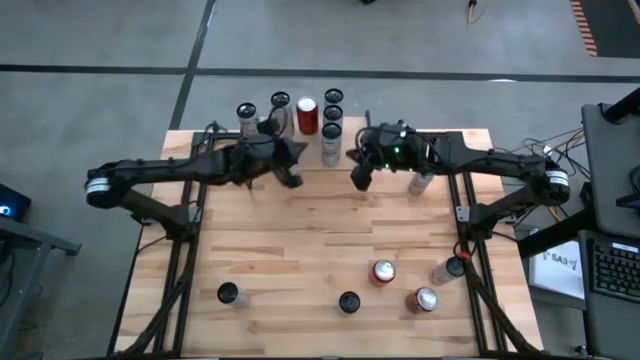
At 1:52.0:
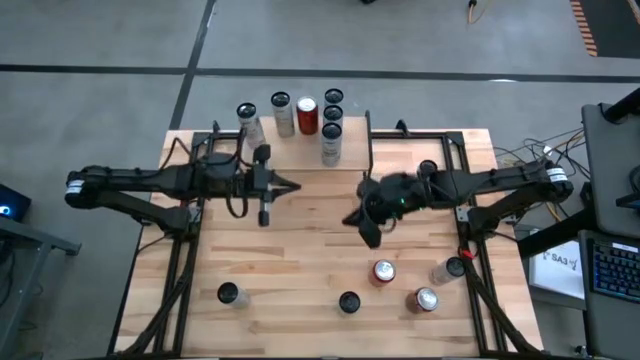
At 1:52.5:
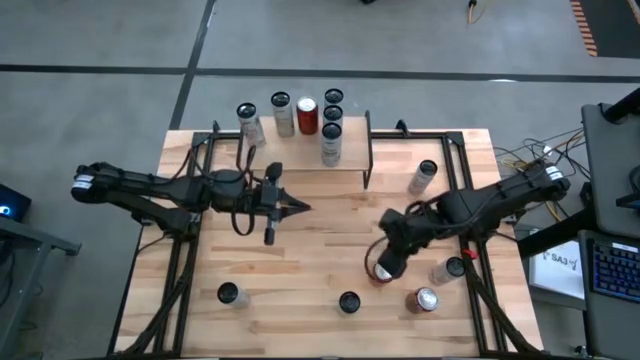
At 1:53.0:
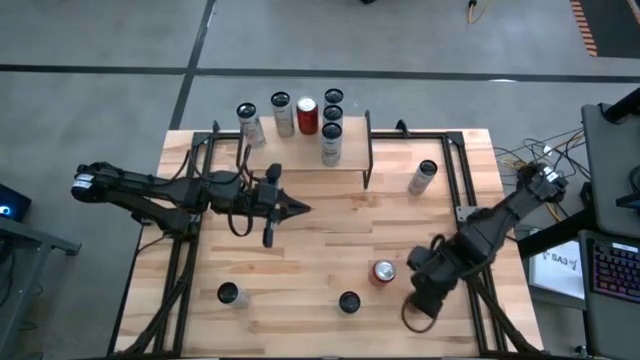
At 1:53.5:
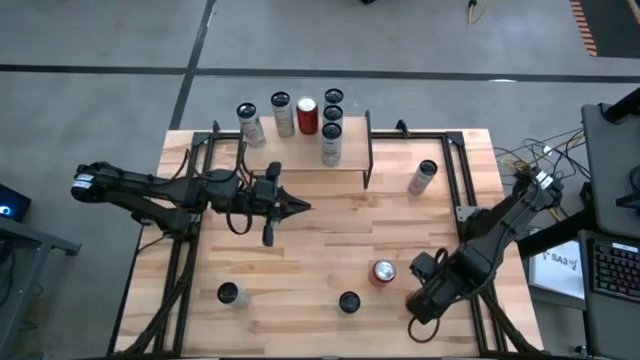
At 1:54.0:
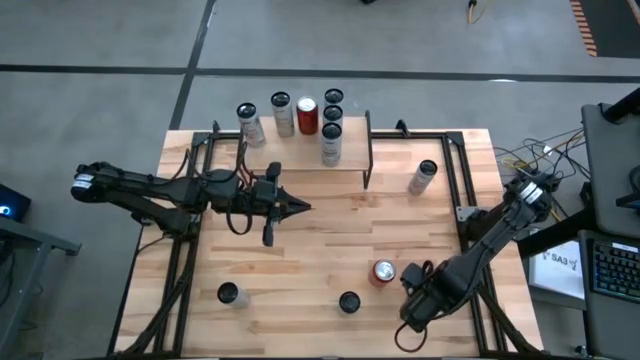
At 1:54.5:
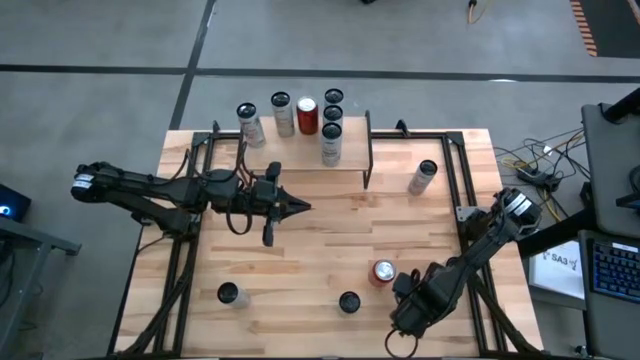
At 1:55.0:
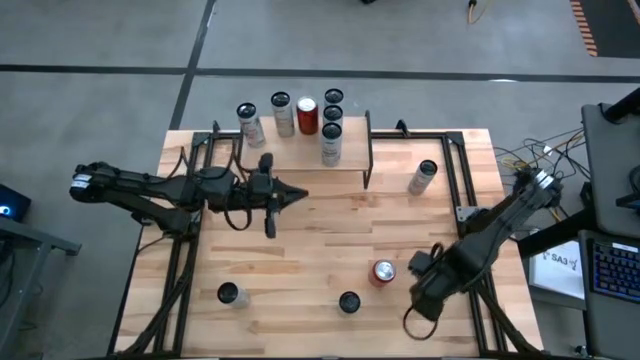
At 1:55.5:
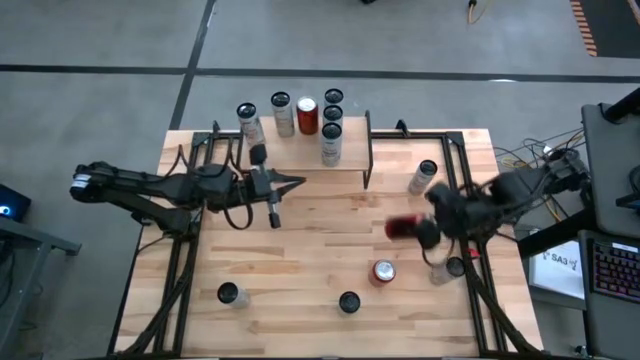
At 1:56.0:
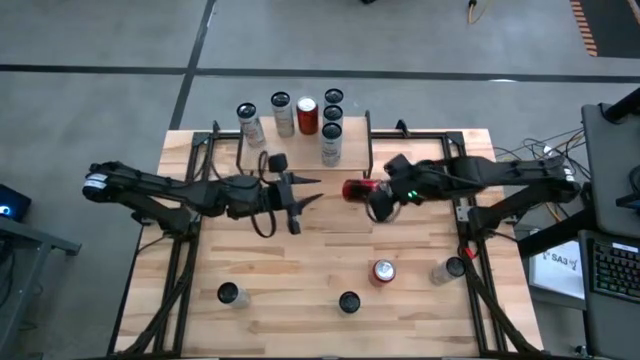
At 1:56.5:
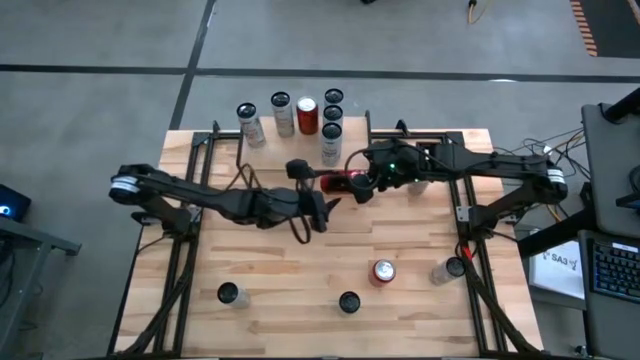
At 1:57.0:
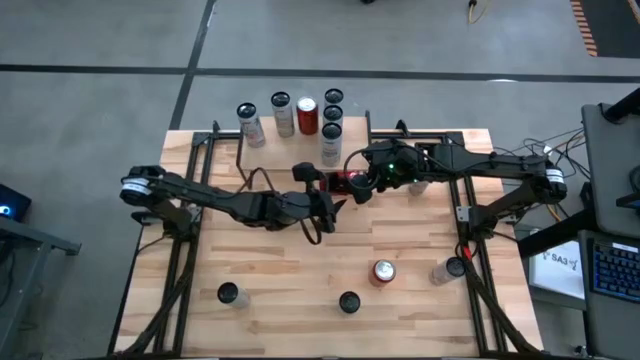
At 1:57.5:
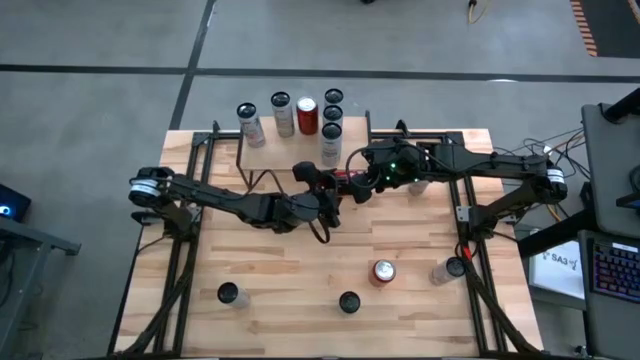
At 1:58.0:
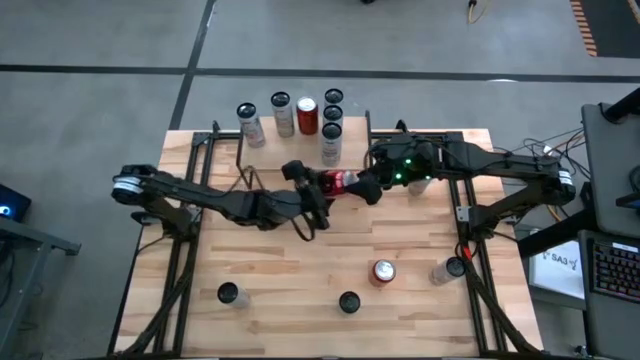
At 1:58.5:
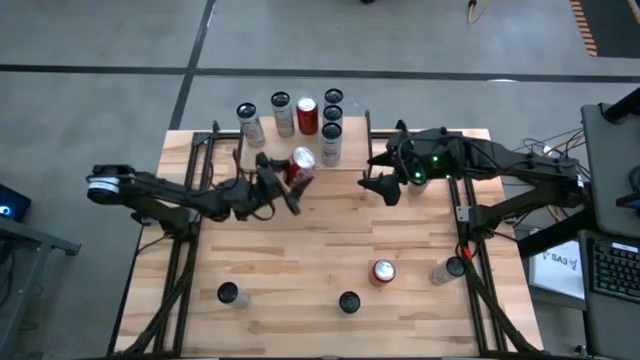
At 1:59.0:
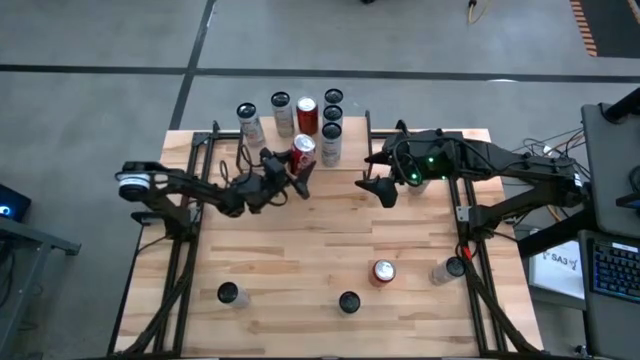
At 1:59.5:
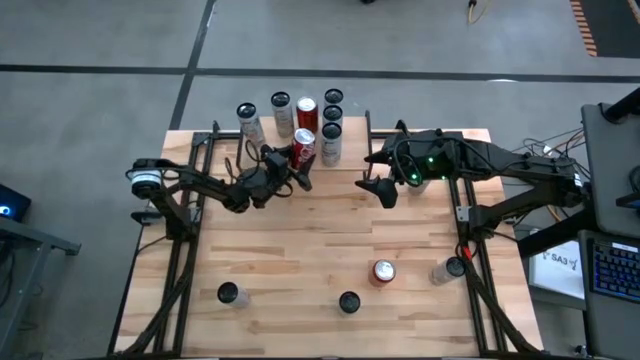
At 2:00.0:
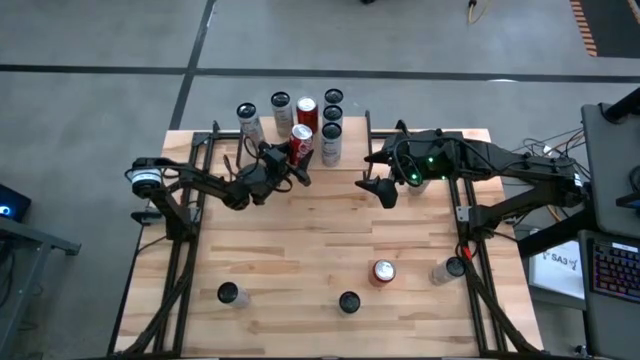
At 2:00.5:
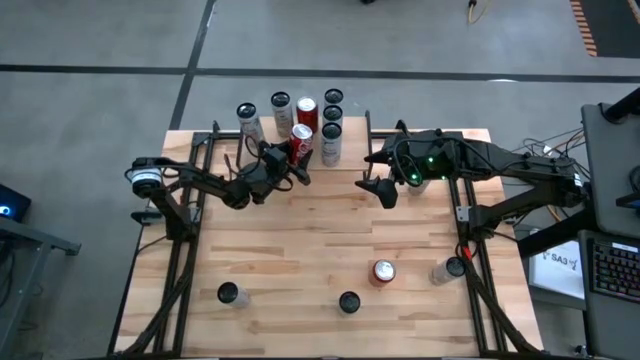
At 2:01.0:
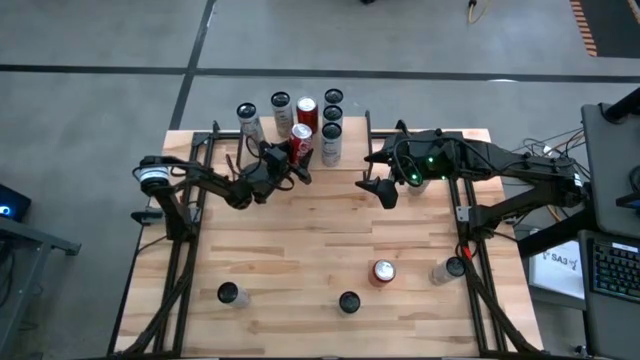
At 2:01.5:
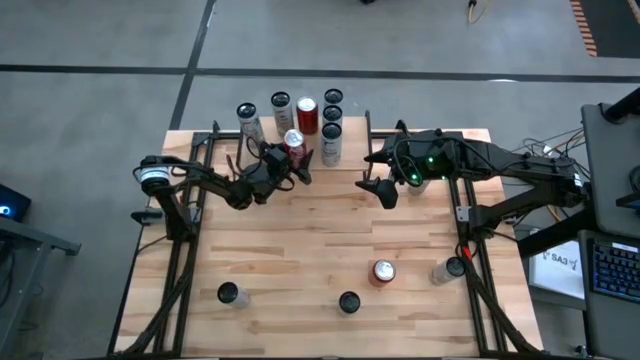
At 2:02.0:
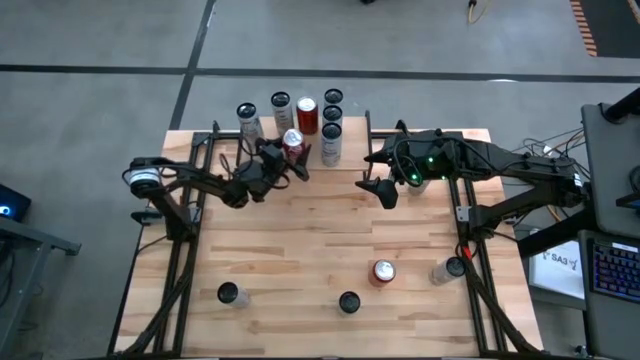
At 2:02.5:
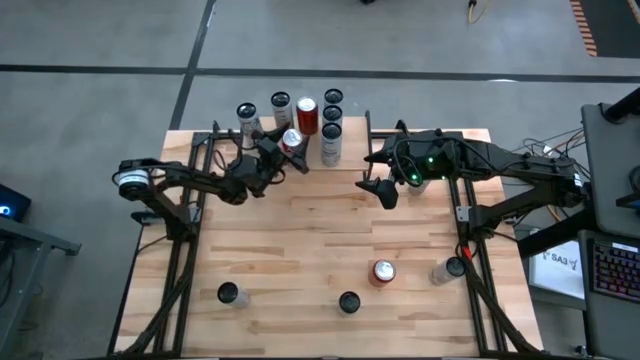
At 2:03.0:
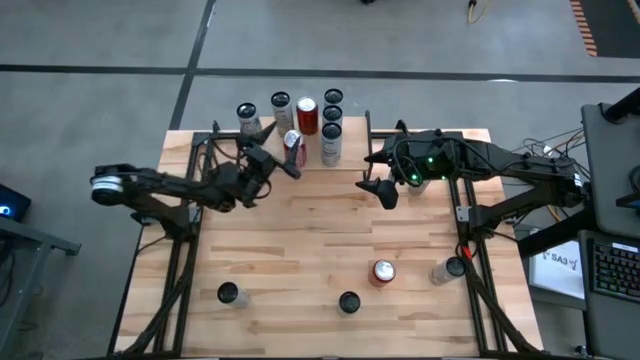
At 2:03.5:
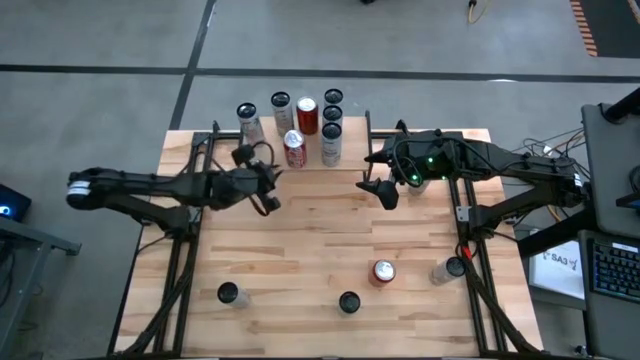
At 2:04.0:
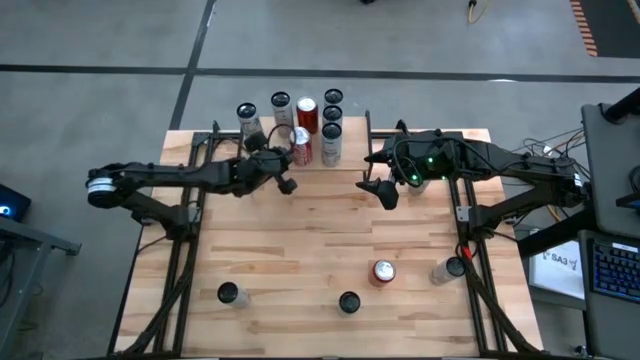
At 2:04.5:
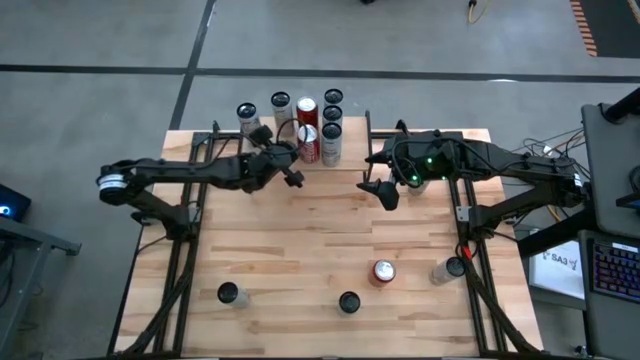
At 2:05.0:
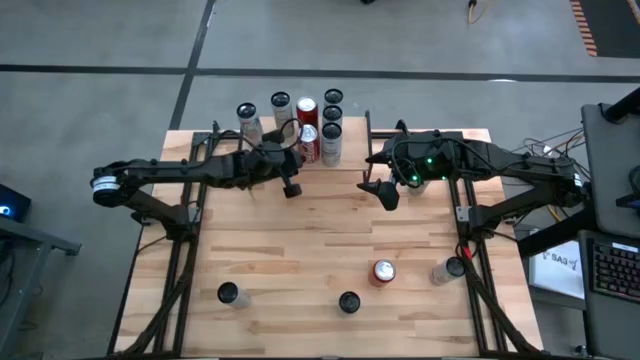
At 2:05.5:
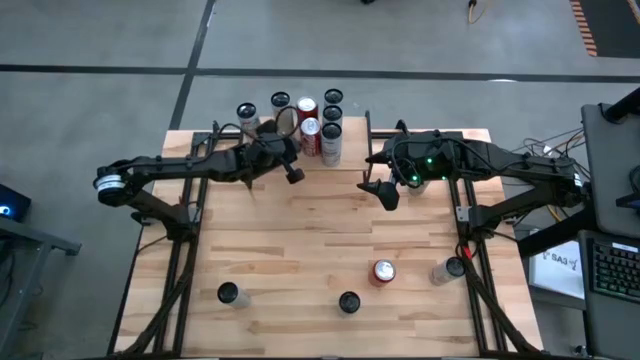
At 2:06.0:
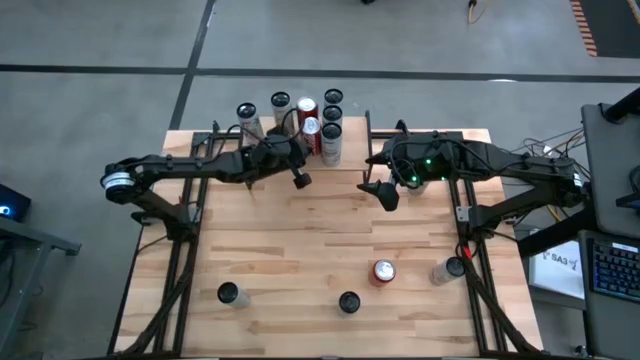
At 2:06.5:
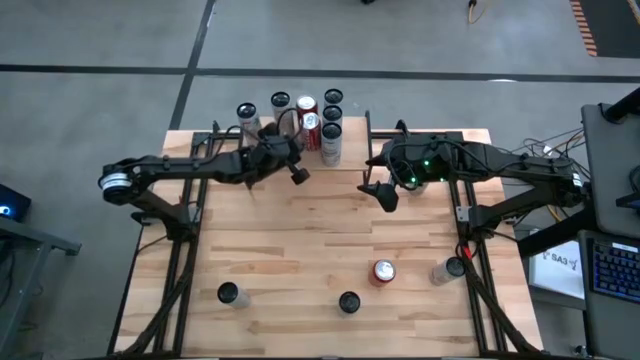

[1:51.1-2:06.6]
Task: Place canned beverage on shelf
Put the red soda can aligned with the other red soda can on the shelf

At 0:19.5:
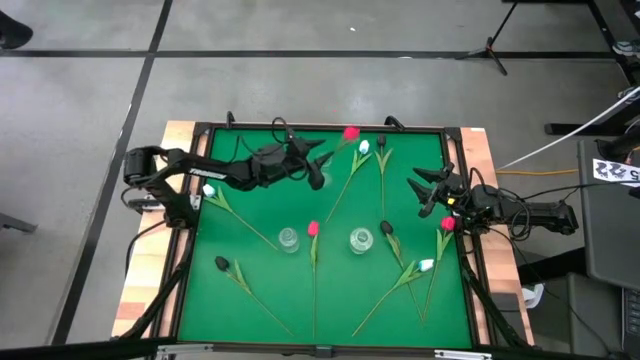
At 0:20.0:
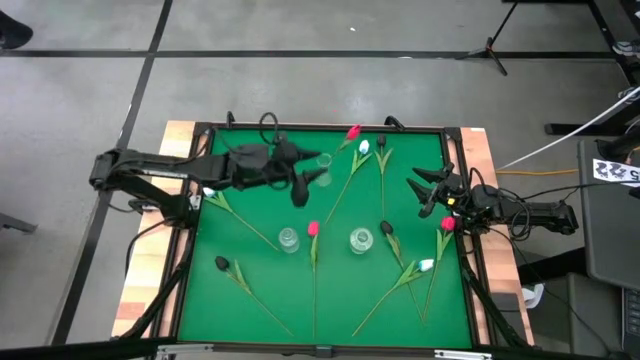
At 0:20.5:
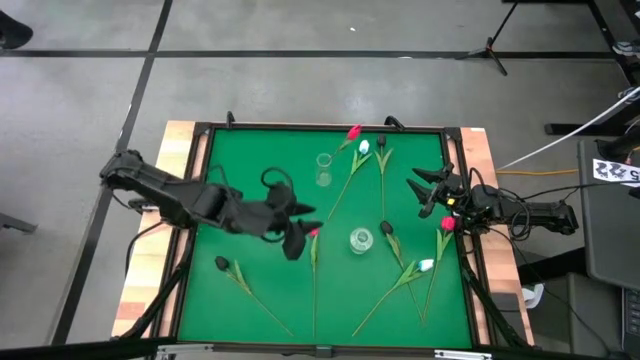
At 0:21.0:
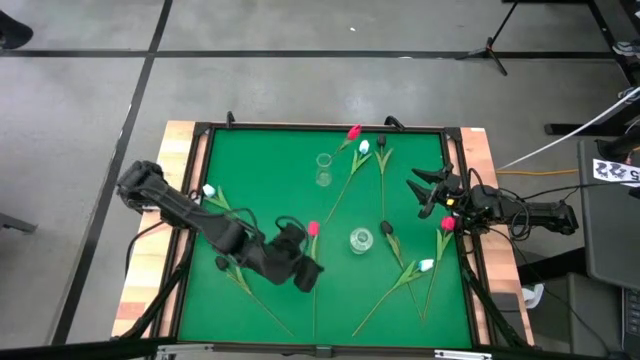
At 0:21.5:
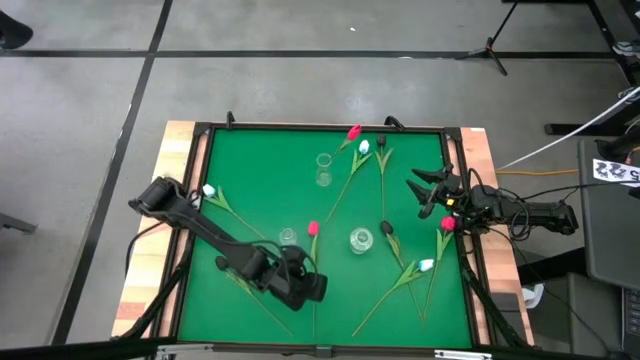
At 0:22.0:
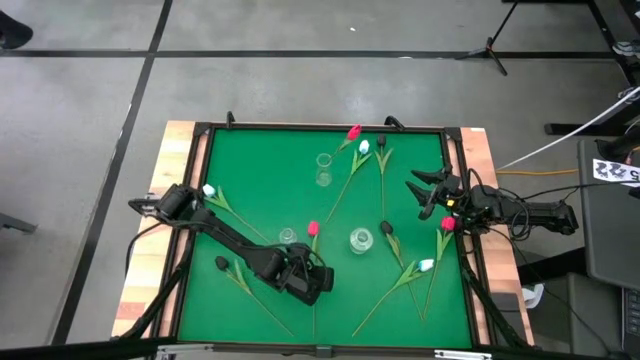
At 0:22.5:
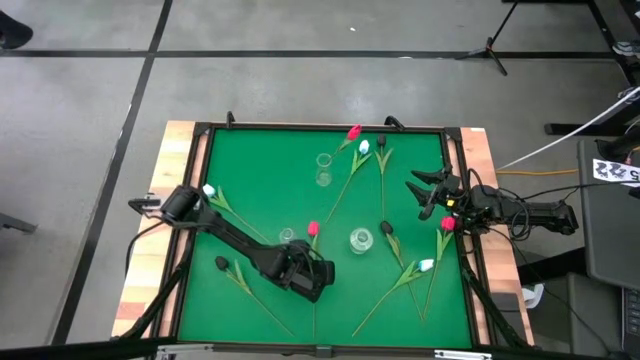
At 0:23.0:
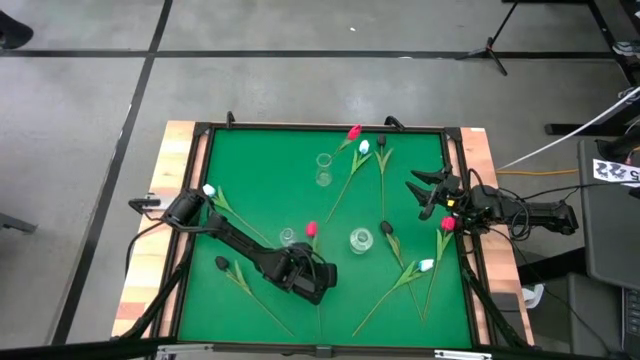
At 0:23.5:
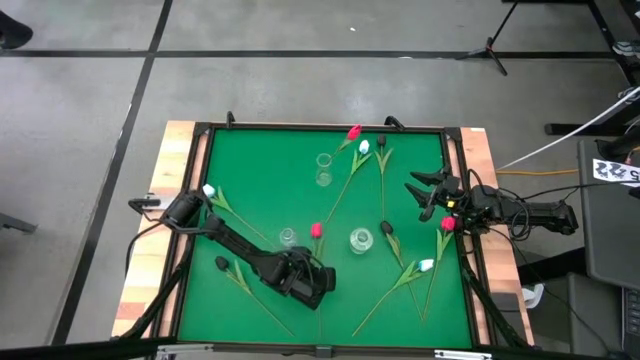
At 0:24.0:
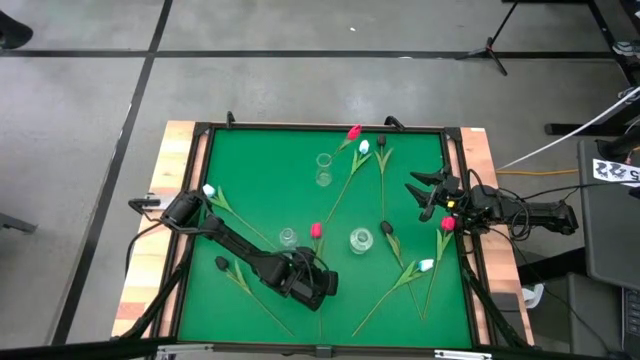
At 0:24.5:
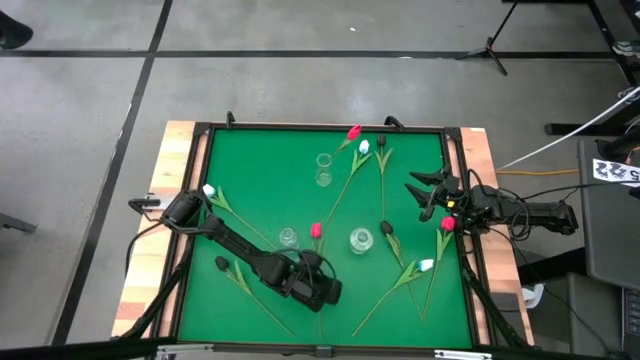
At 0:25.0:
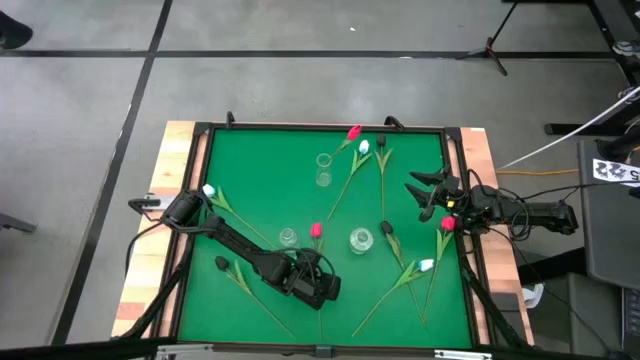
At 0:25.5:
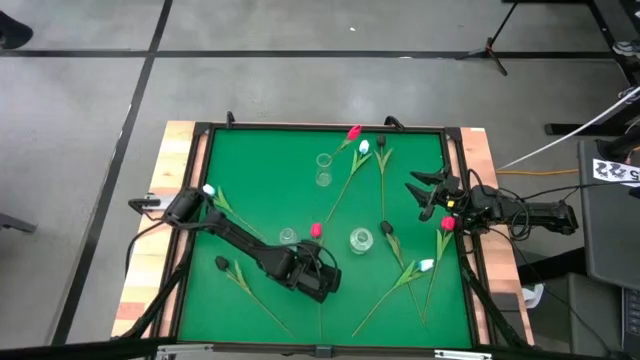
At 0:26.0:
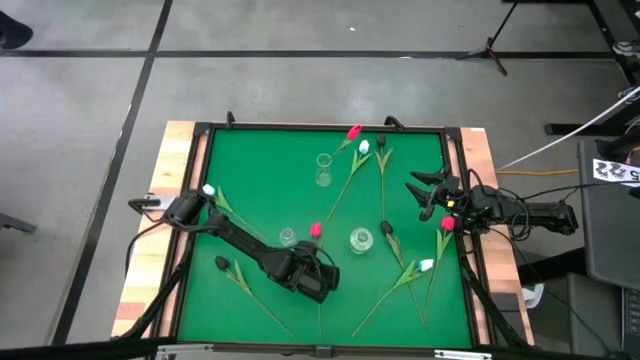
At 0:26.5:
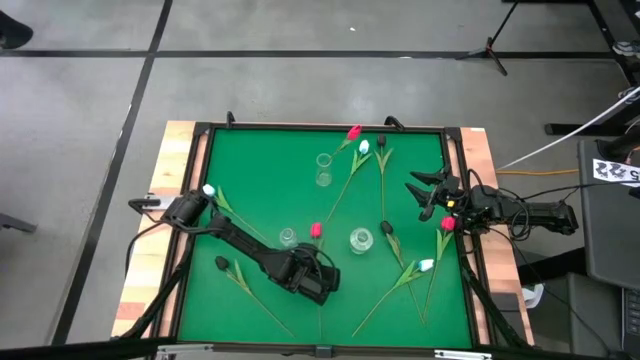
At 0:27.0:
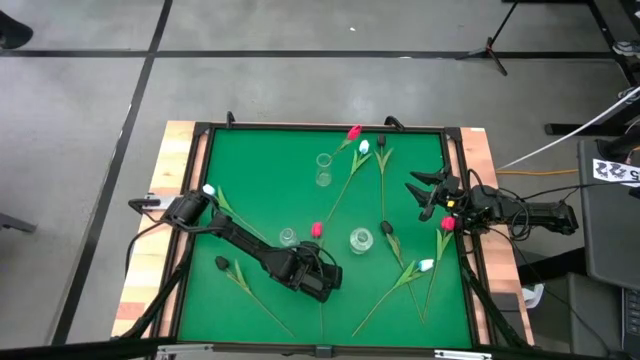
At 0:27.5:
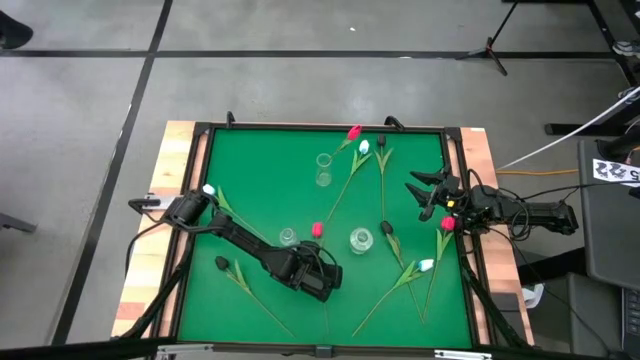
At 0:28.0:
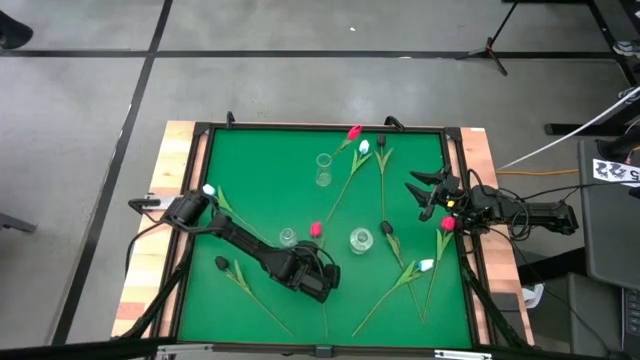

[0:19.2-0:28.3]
Task: Sort flowers into vase by color
Put the left red tulip into the top transparent vase
